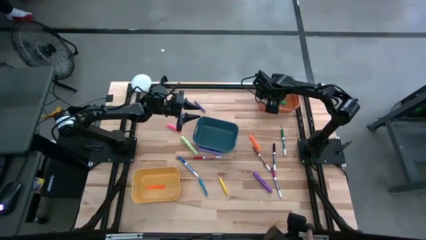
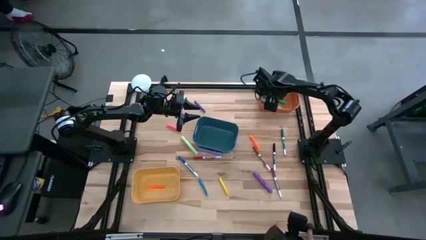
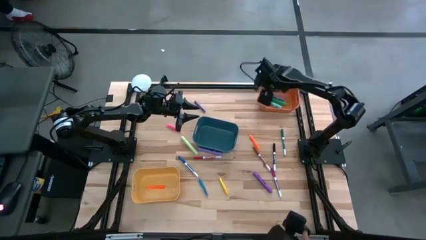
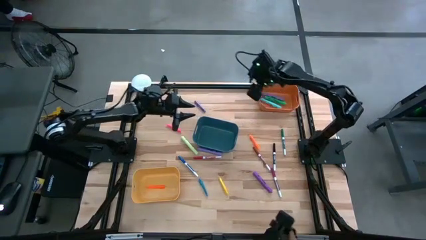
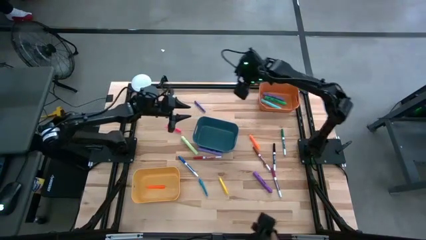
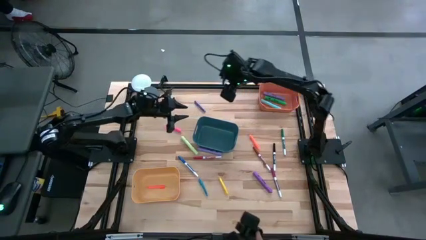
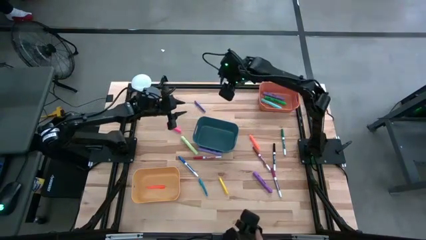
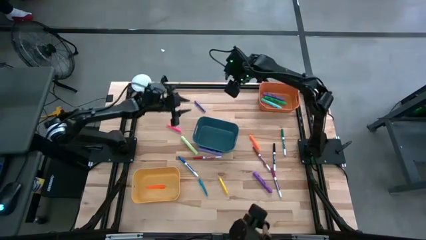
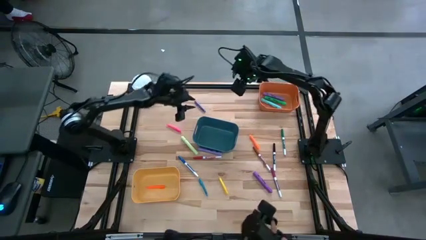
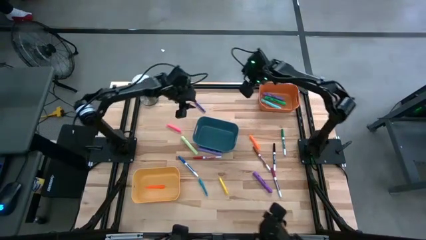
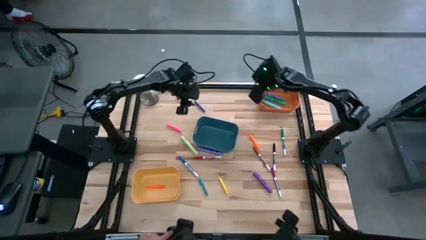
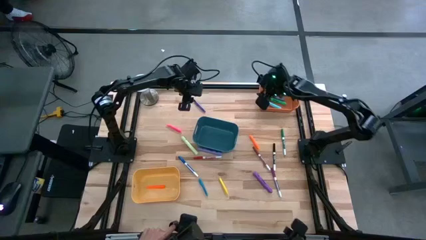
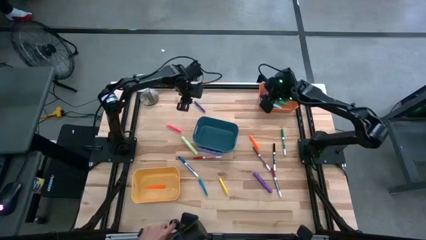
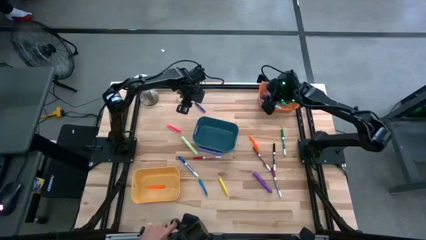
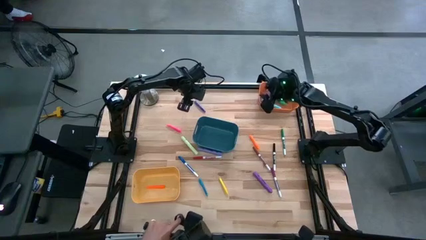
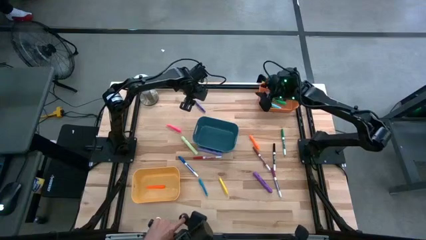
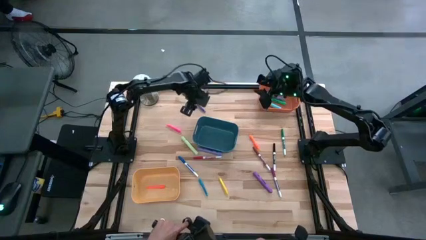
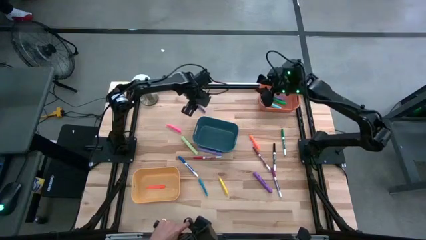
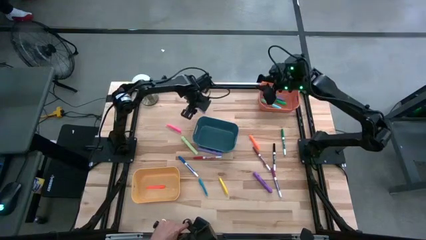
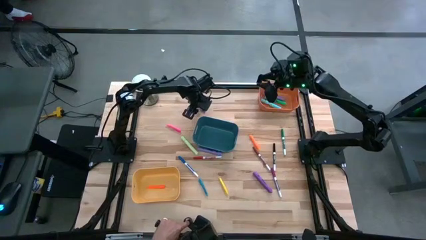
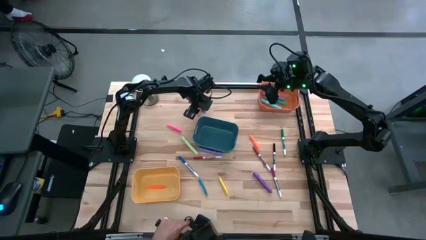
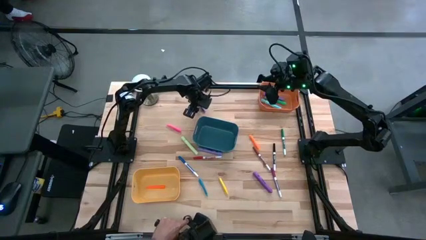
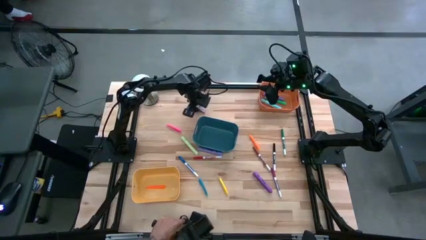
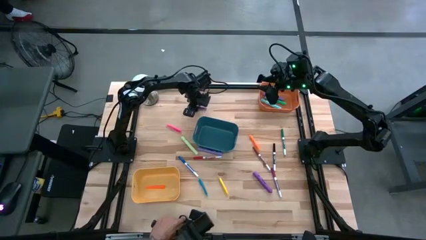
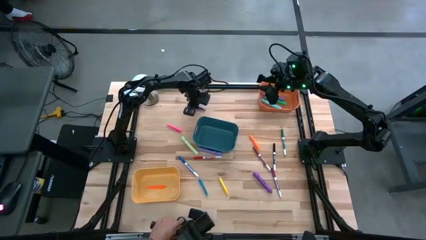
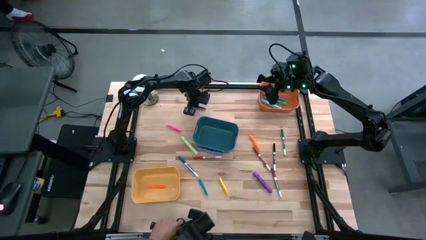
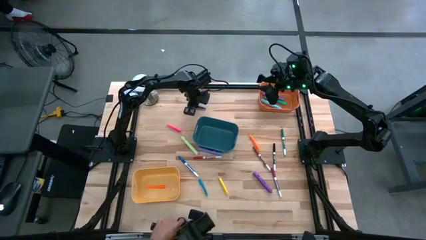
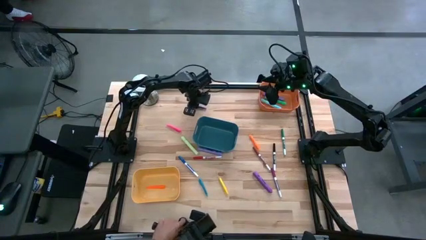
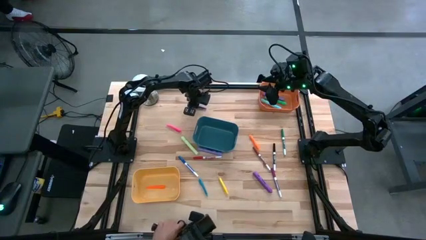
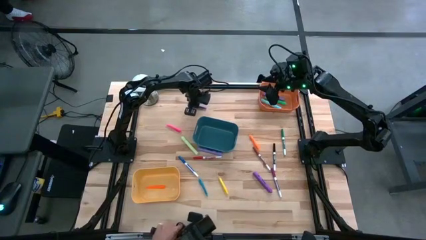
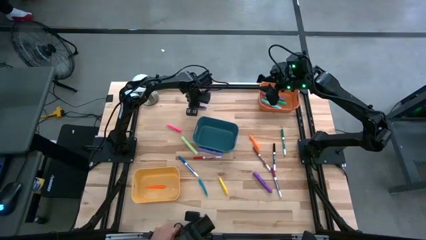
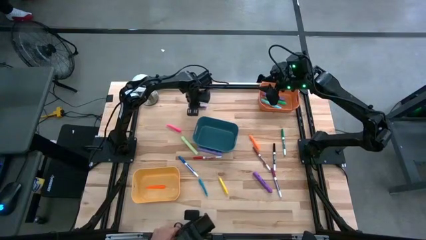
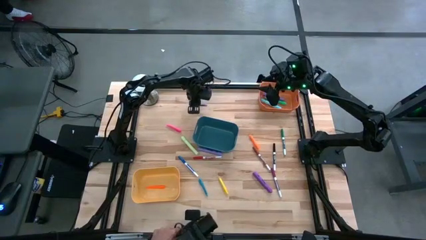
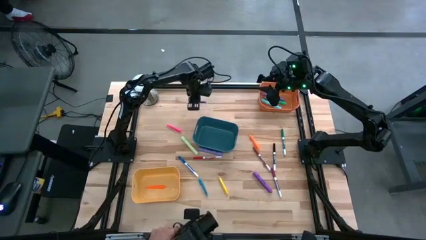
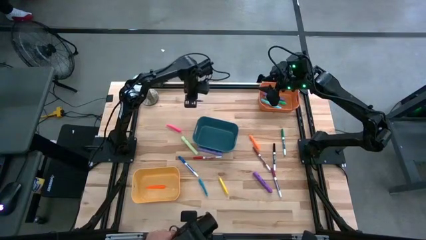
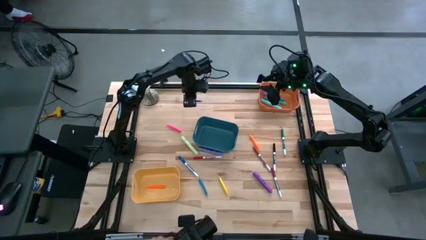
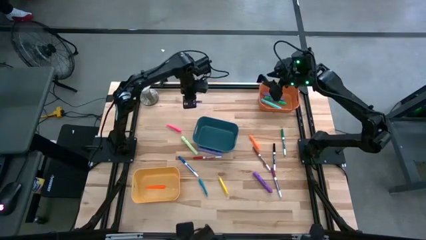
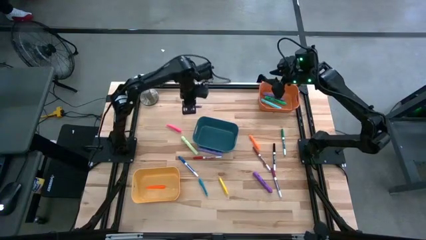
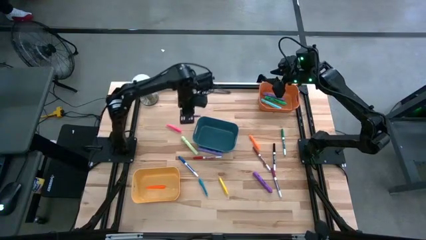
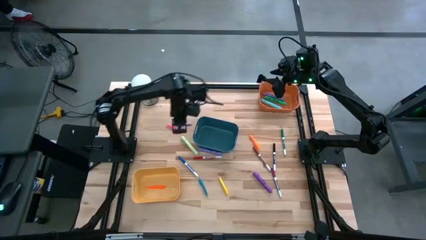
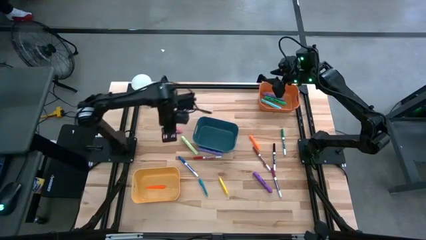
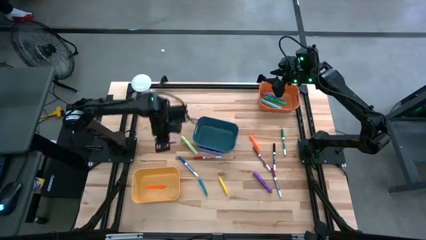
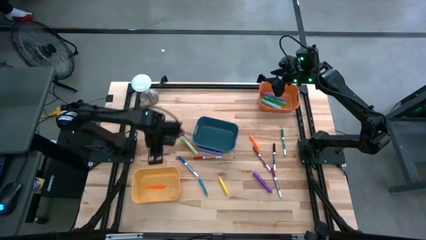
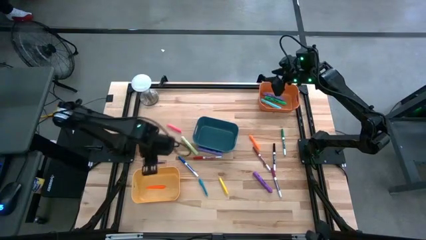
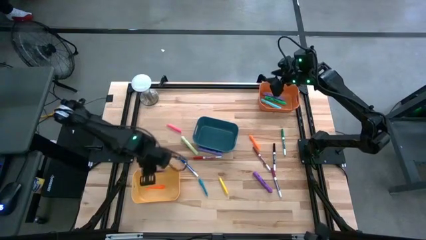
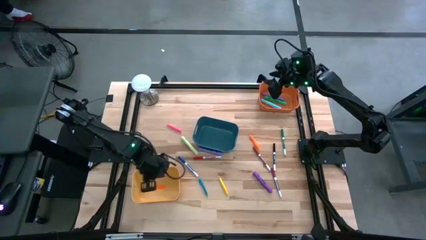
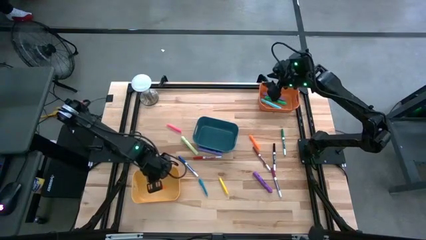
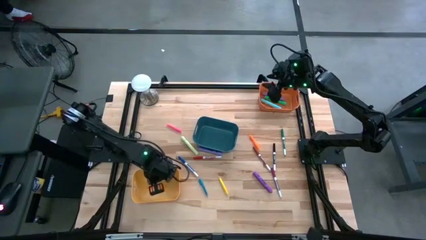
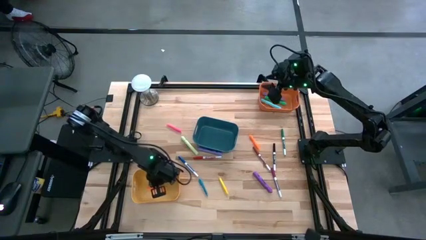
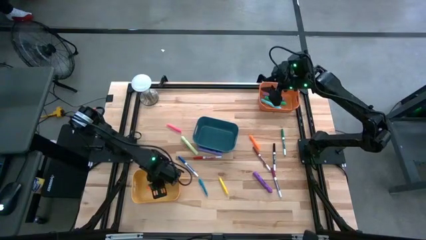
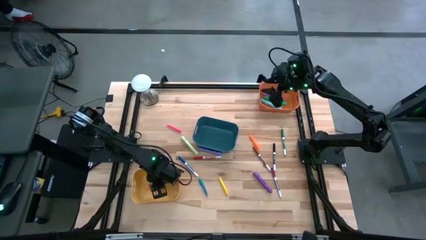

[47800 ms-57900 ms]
Task: Pick & Place Markers
Put the violet pen into the yellow bin

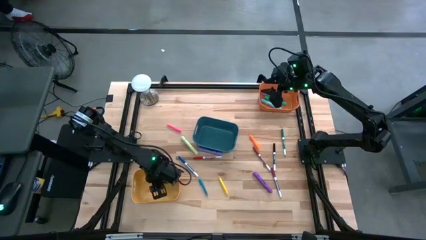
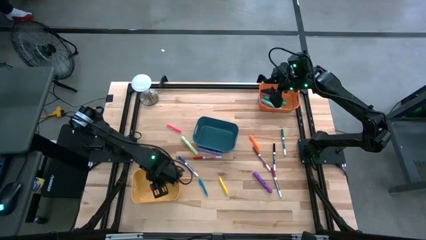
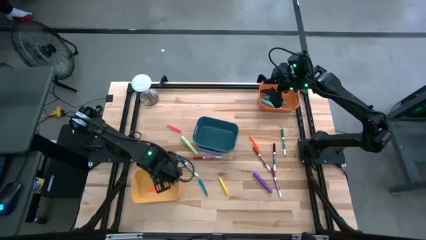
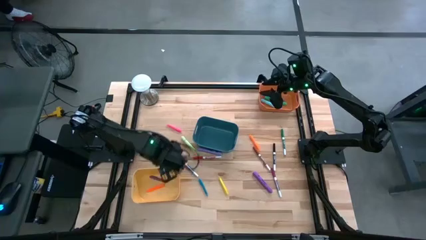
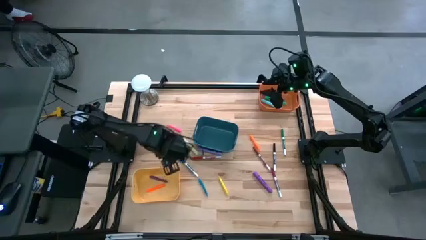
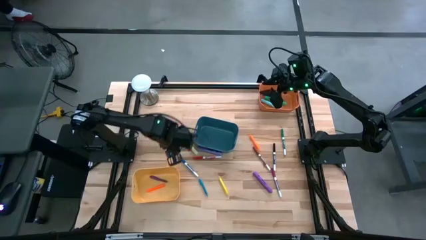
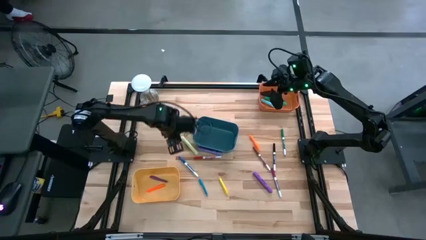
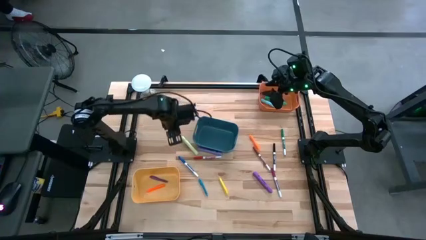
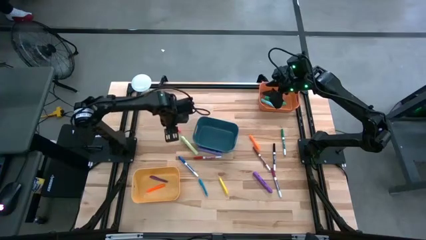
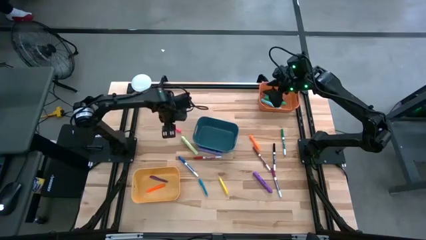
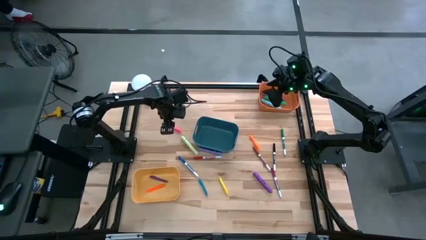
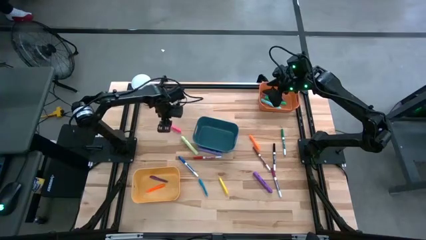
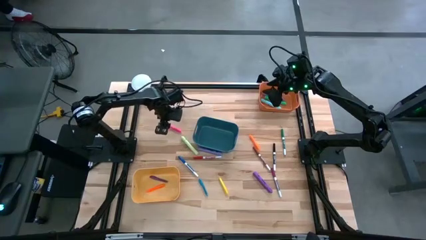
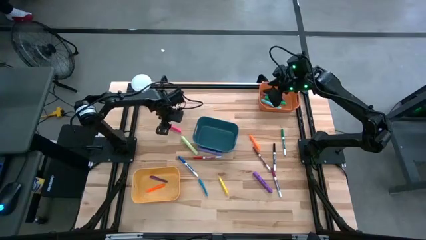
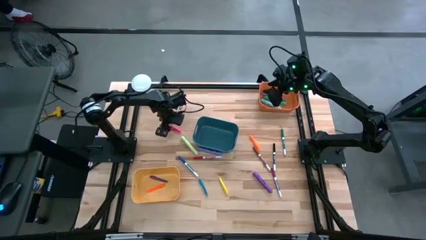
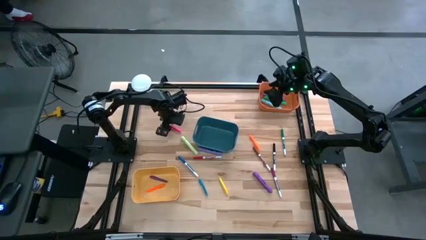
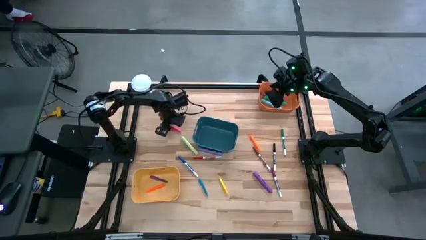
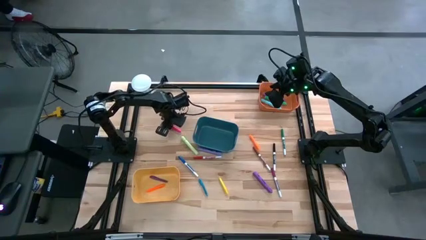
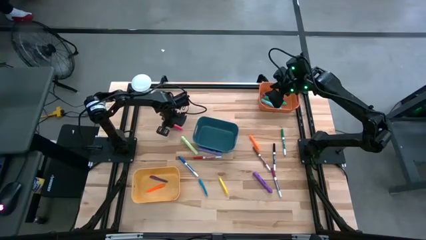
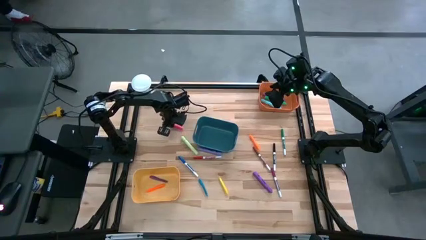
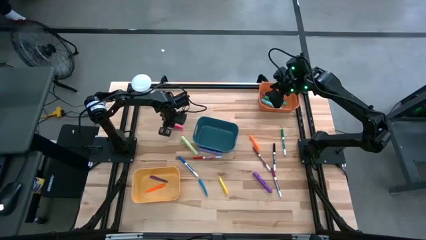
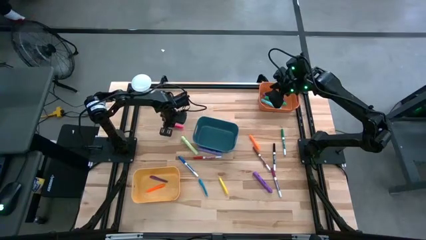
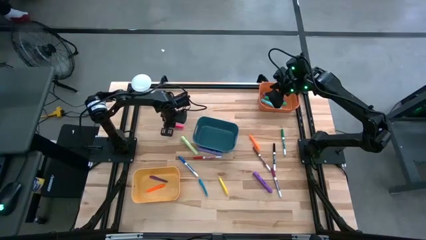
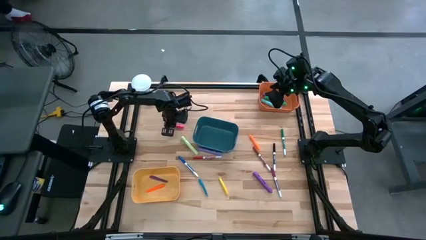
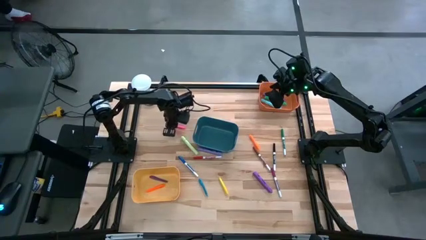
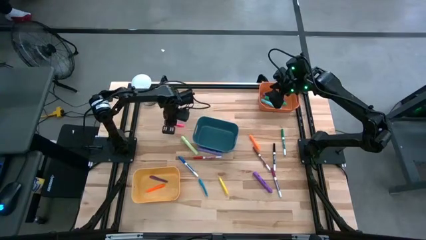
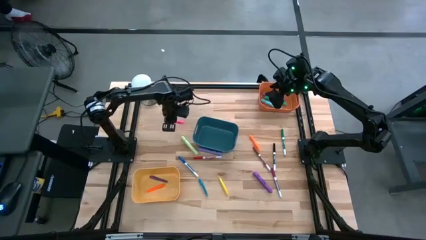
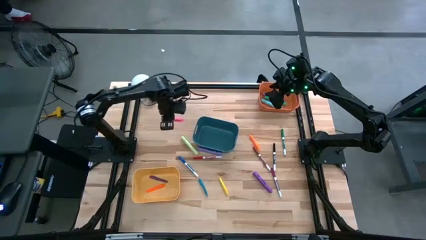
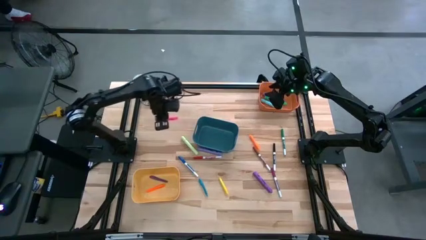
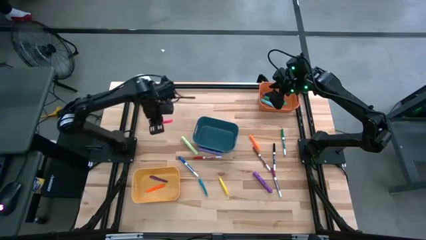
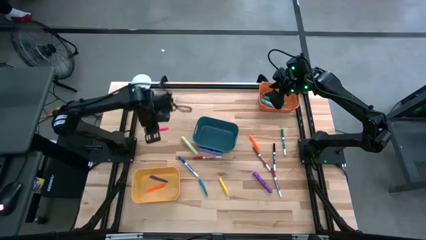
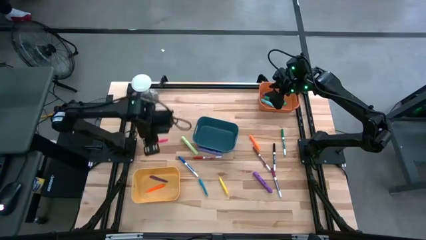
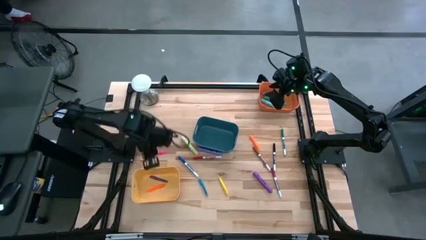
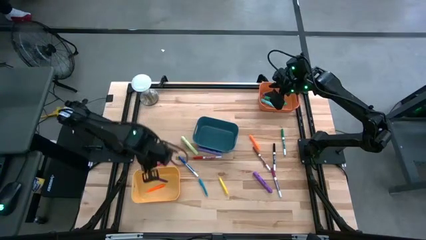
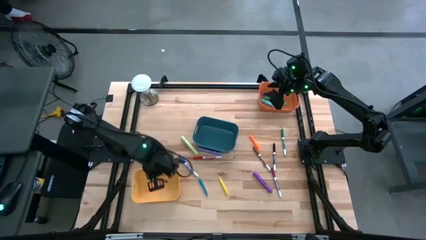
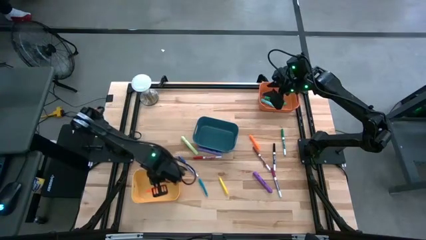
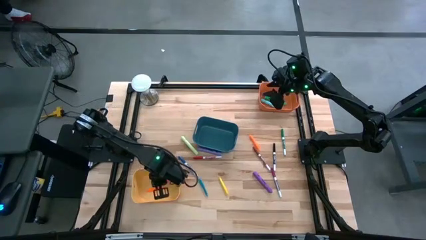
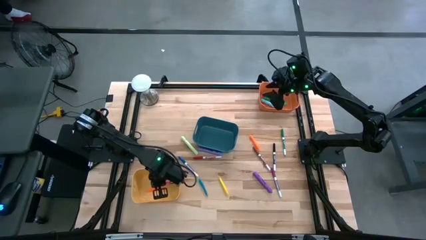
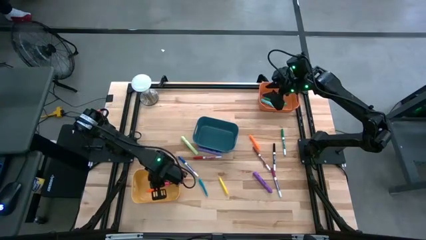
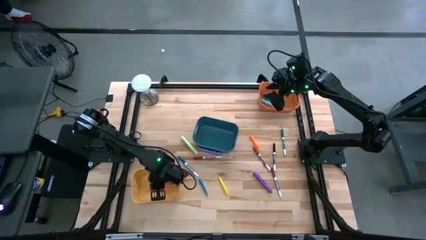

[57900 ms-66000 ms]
Put the pink pen into the yellow bin
